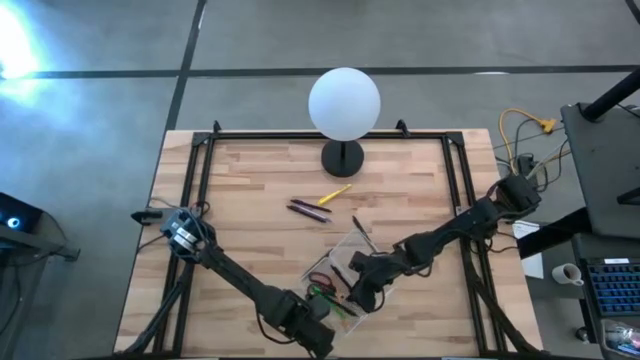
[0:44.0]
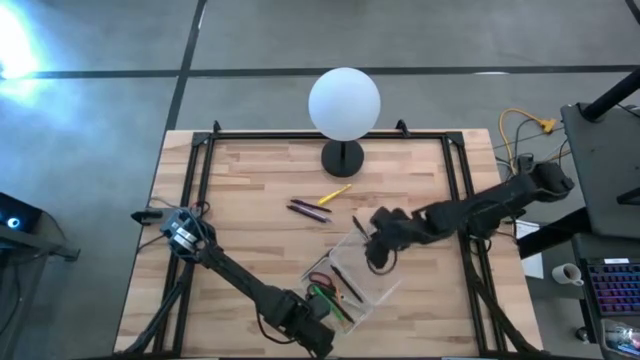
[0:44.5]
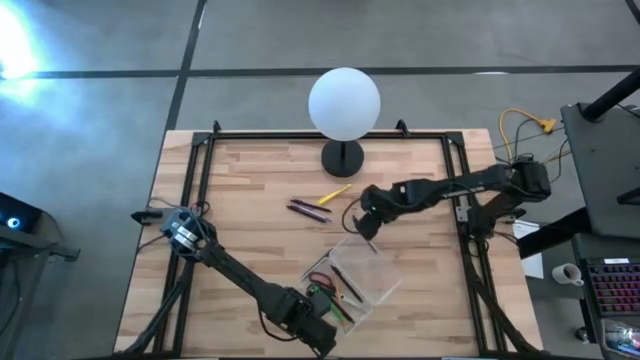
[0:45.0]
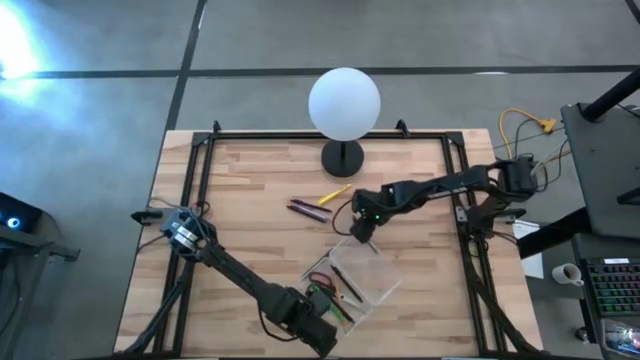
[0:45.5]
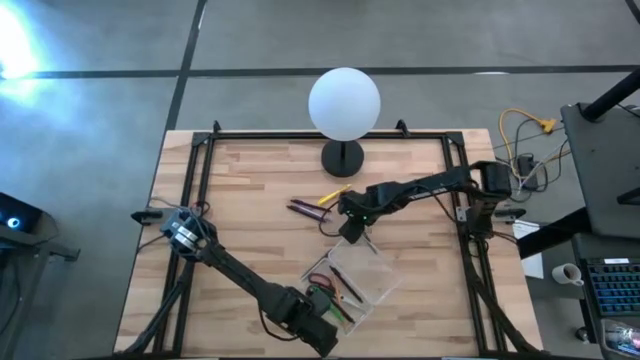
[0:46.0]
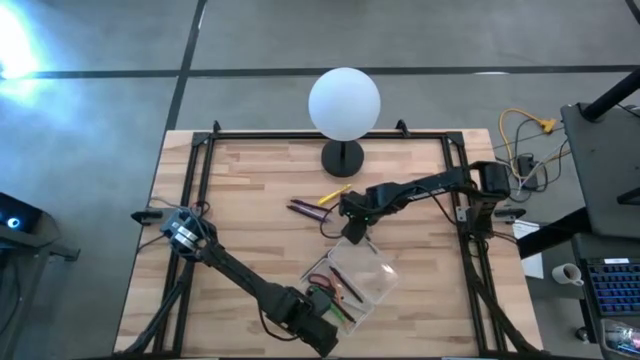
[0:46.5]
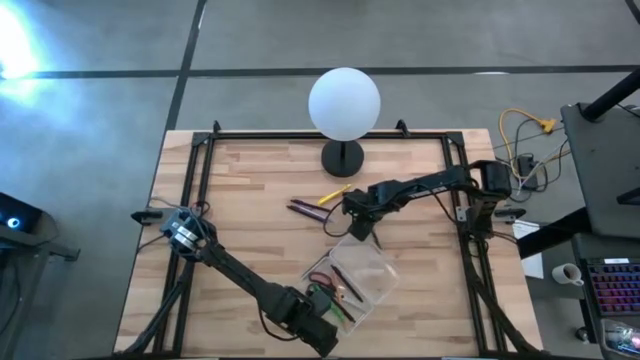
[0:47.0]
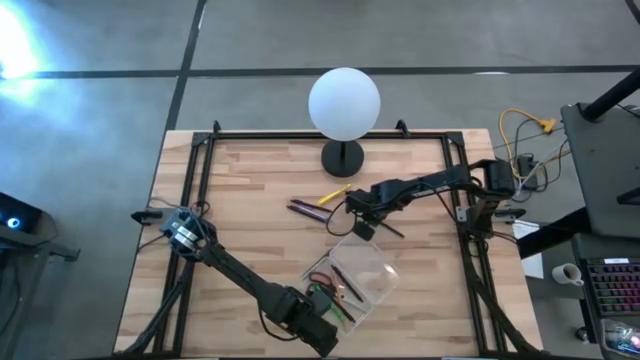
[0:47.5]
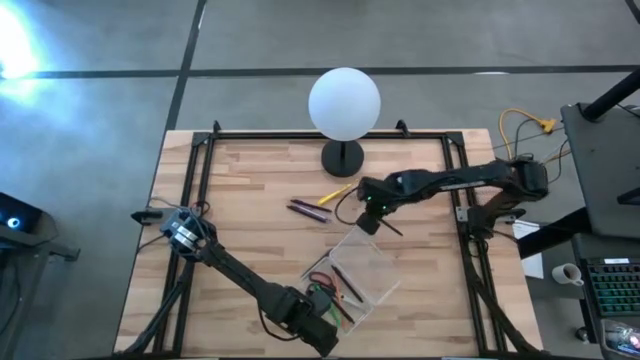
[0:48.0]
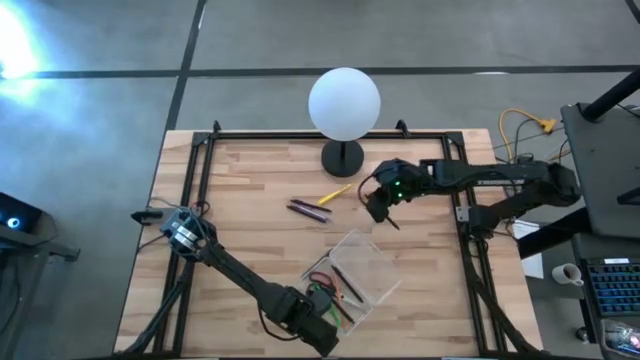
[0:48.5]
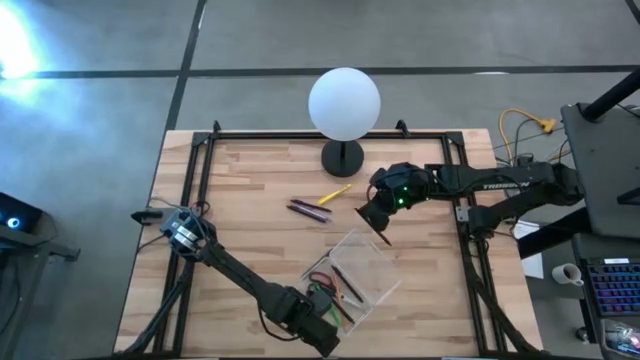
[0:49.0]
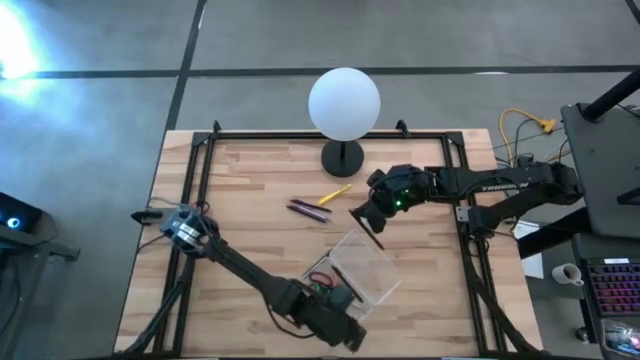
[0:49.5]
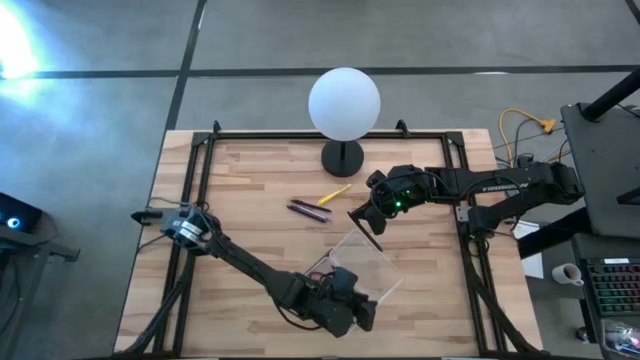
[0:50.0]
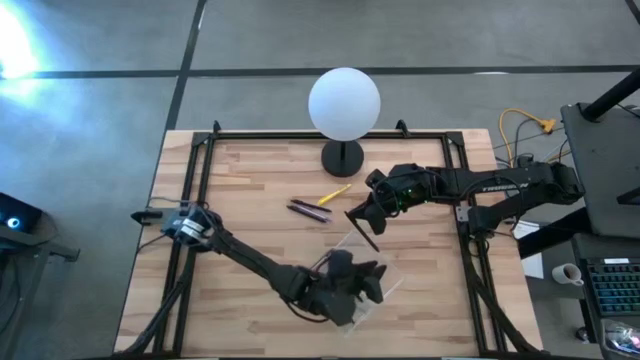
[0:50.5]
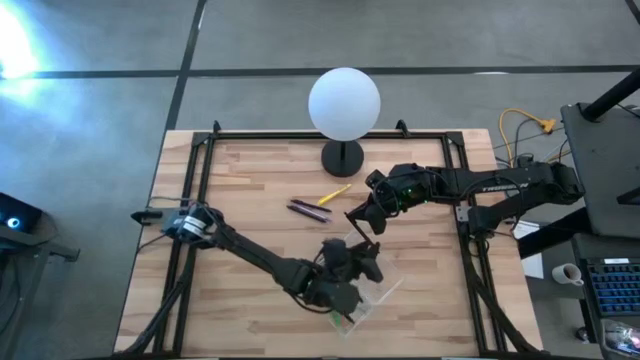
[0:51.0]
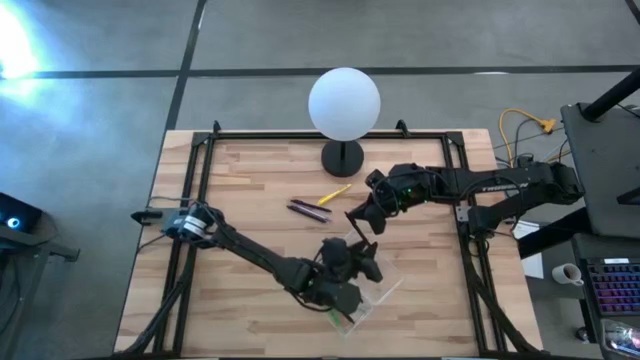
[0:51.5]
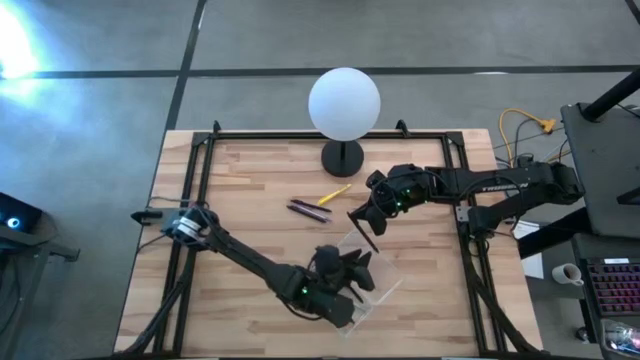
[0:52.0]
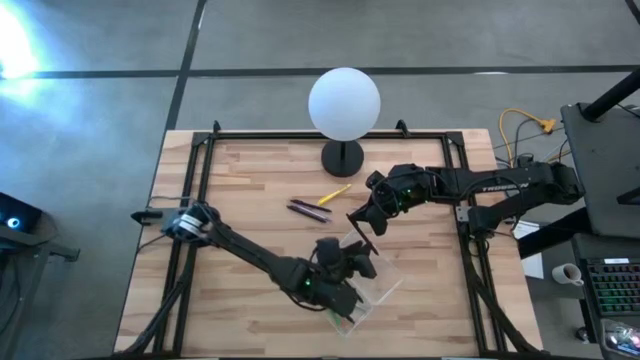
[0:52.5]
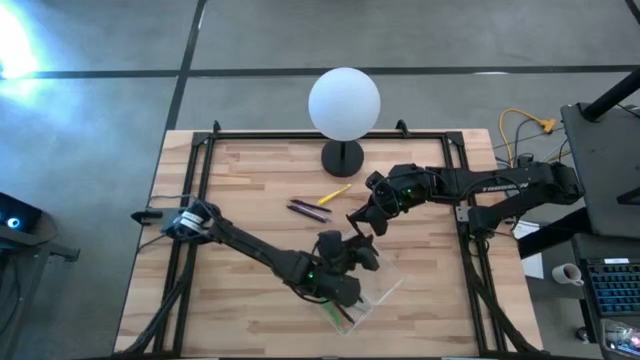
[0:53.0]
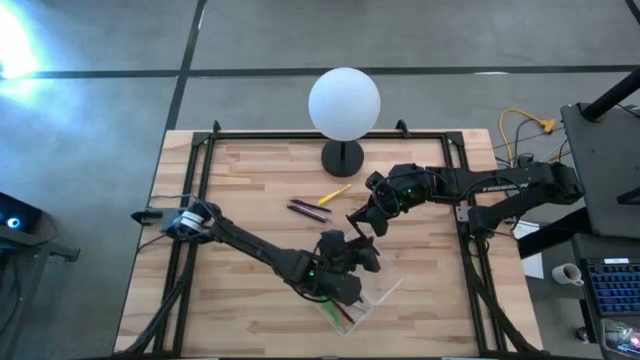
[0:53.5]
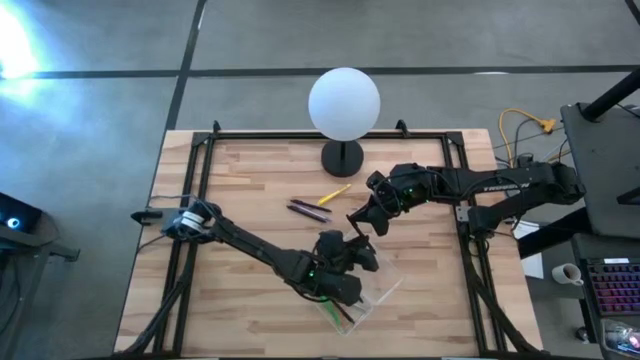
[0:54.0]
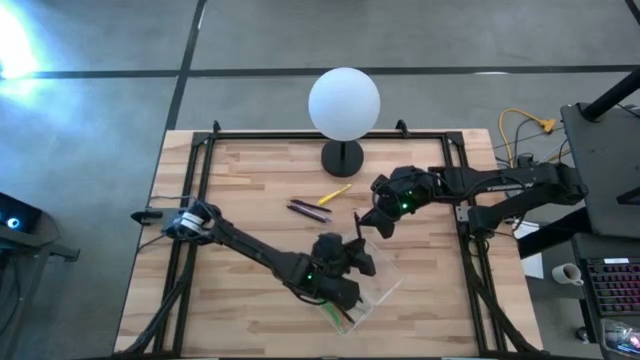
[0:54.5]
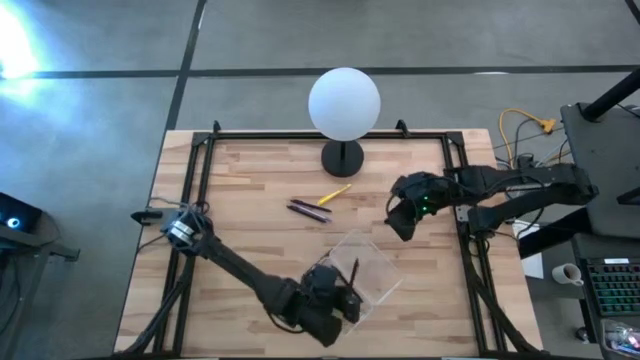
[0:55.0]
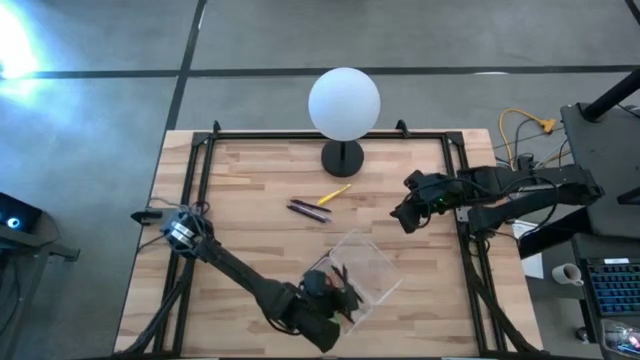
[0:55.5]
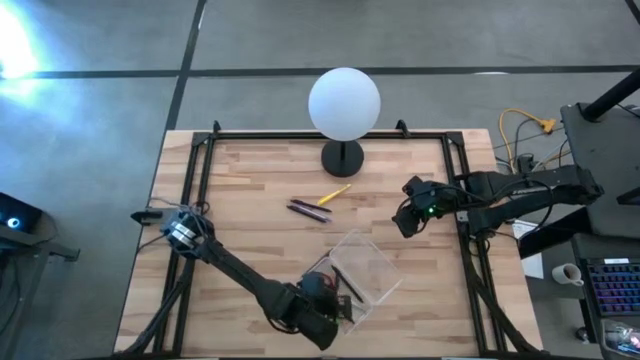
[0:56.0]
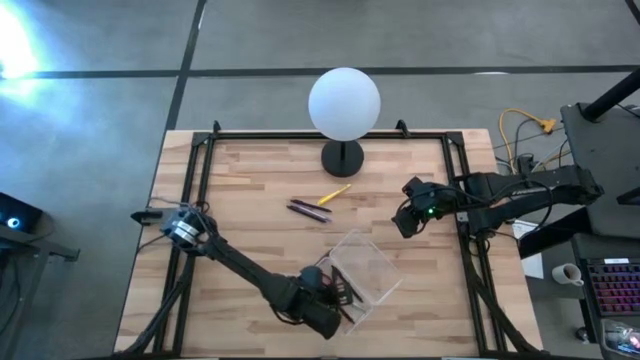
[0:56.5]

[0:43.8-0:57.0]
Task: Pick & place school supplies into a supply box
Put the black pen into the supply box

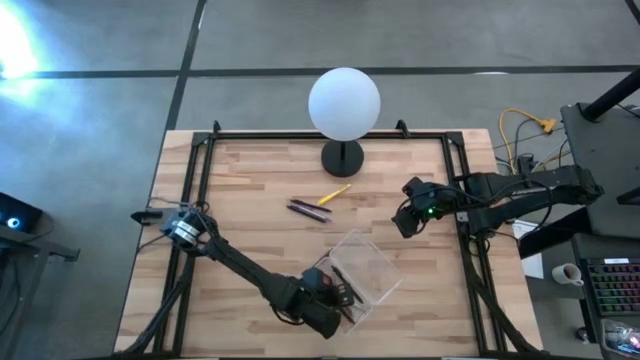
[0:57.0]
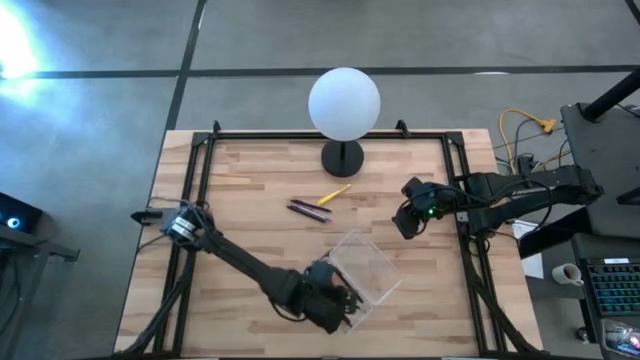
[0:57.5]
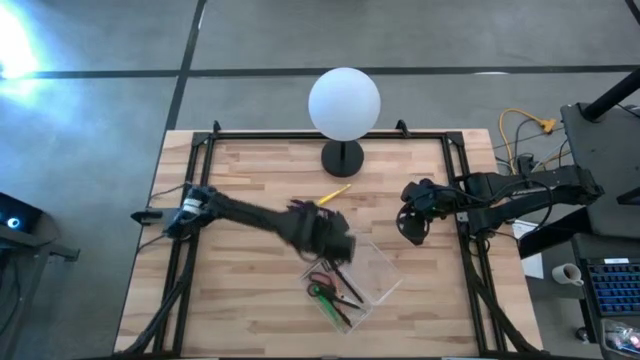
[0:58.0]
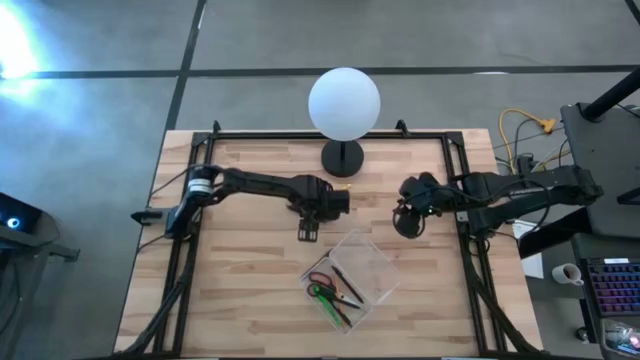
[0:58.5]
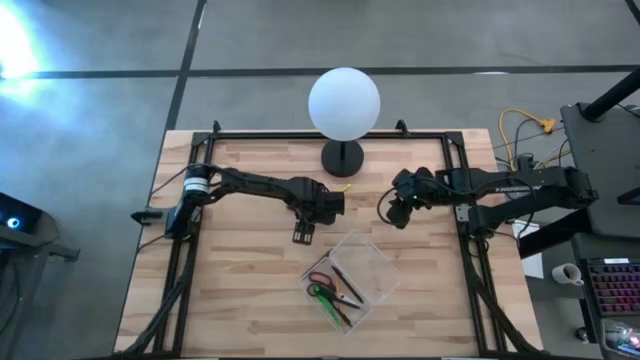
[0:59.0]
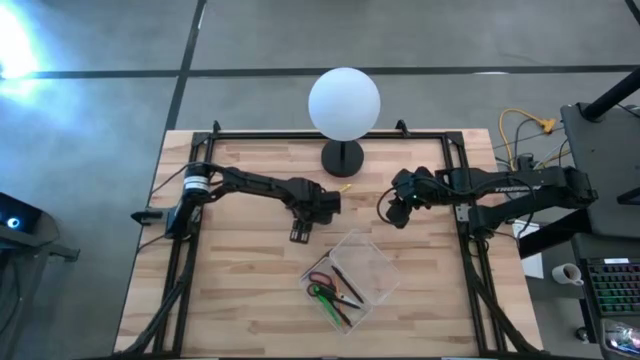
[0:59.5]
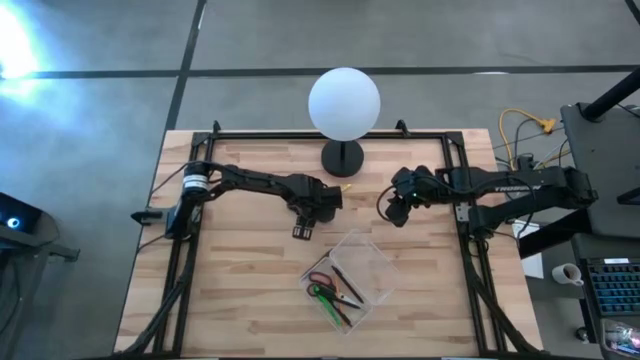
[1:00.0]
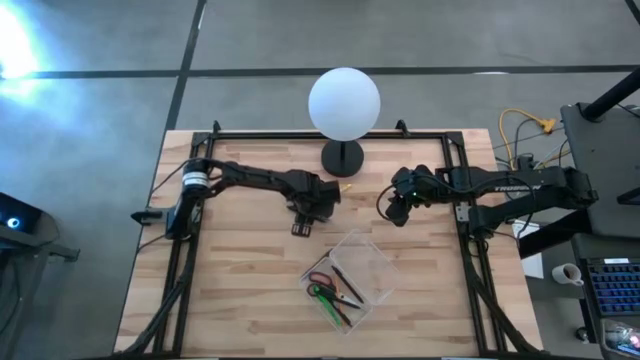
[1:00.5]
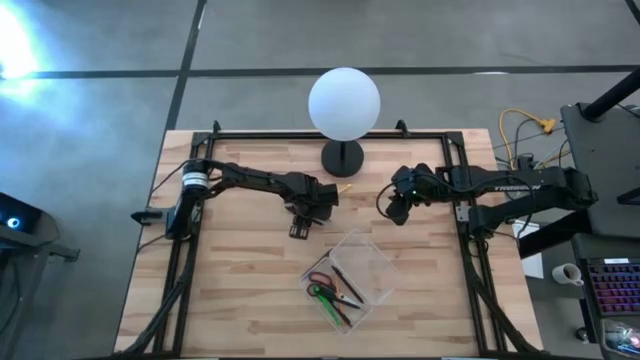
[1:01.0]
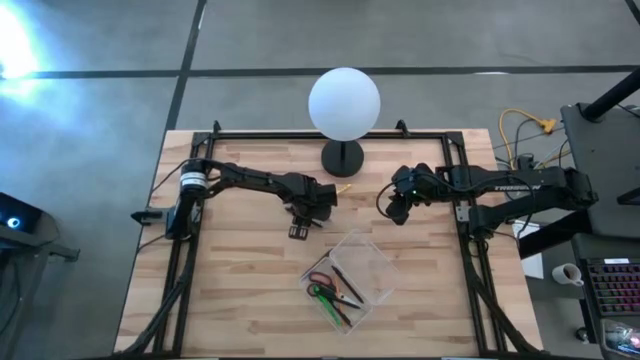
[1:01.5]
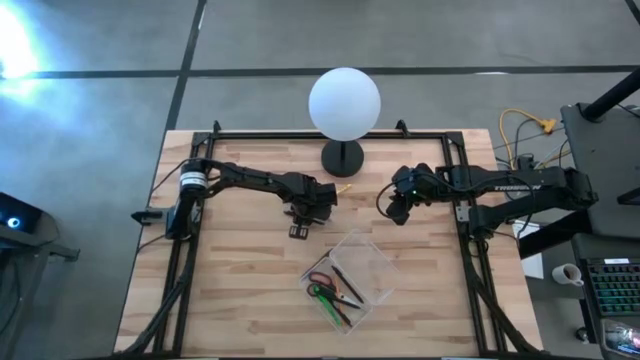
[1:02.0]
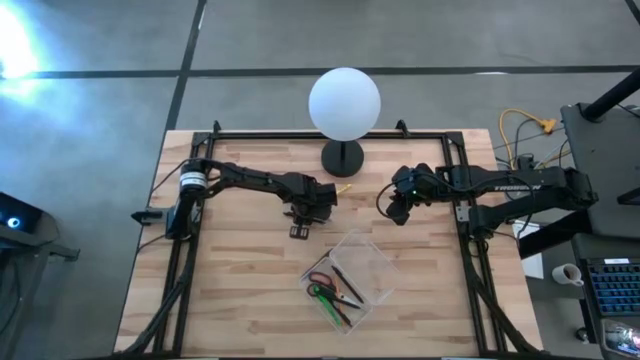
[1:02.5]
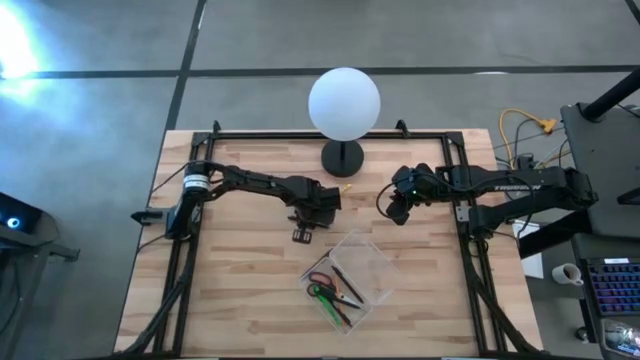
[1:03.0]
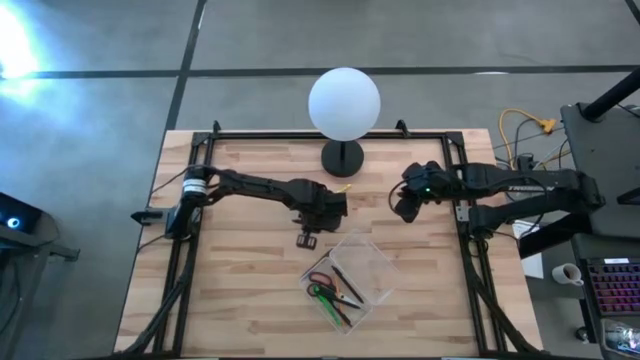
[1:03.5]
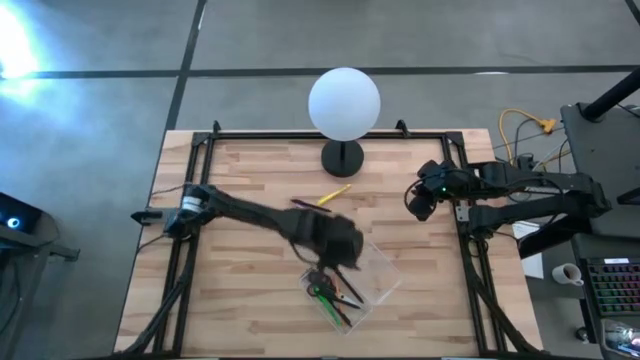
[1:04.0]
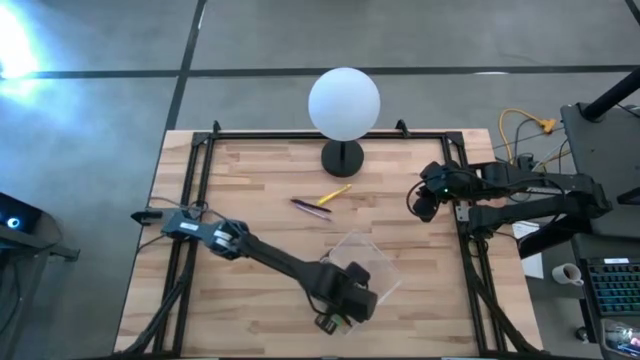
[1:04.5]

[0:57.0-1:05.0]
Put the black pen into the supply box
